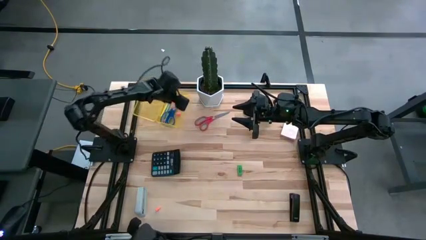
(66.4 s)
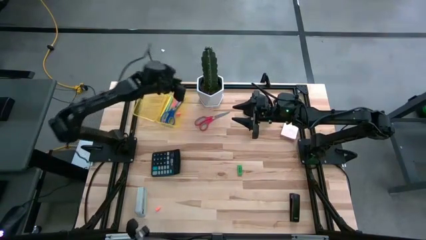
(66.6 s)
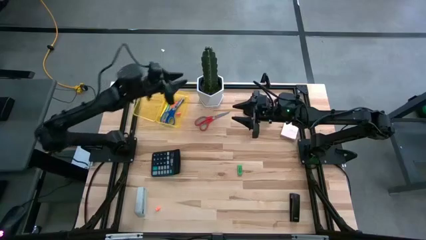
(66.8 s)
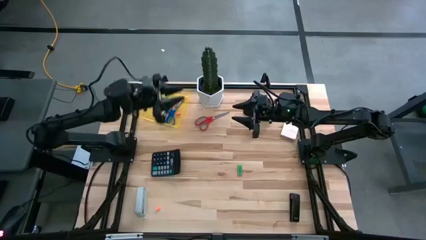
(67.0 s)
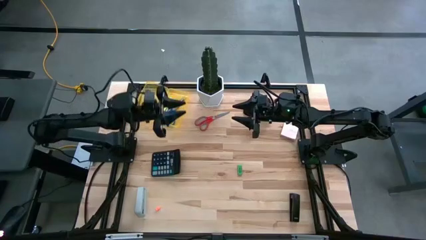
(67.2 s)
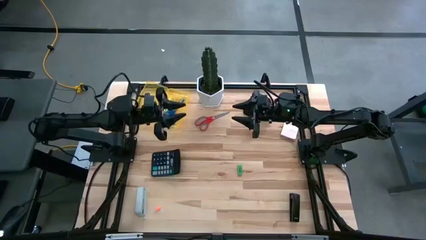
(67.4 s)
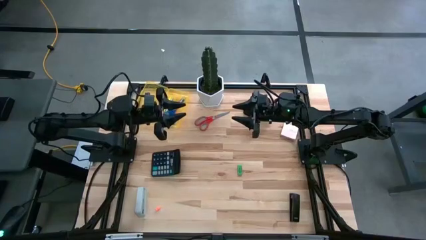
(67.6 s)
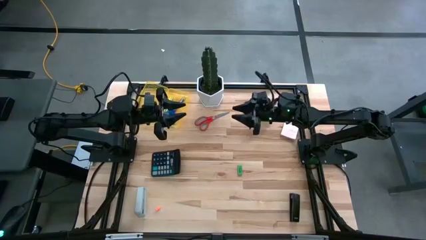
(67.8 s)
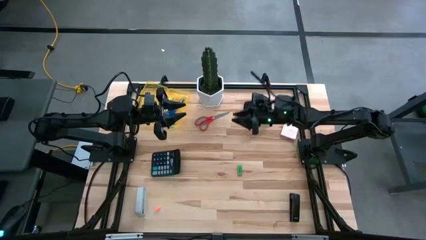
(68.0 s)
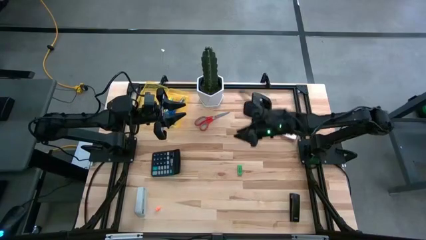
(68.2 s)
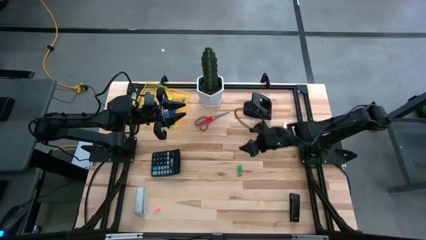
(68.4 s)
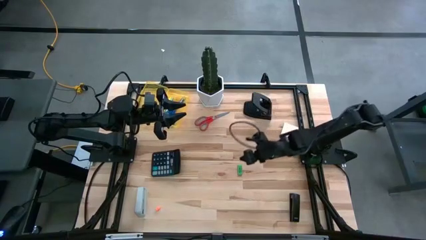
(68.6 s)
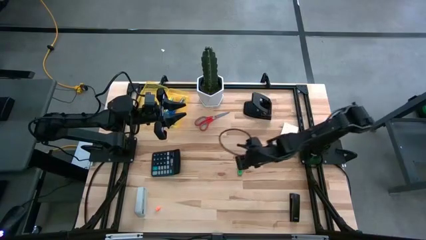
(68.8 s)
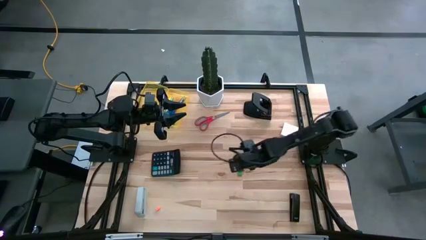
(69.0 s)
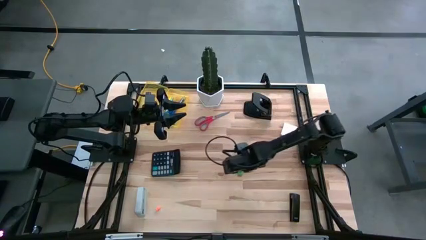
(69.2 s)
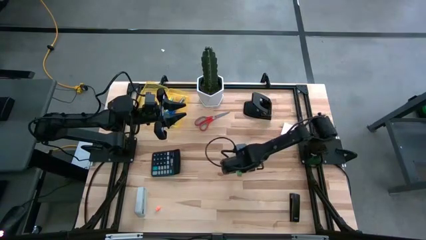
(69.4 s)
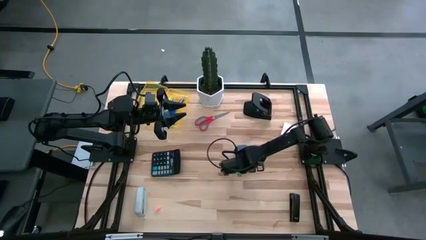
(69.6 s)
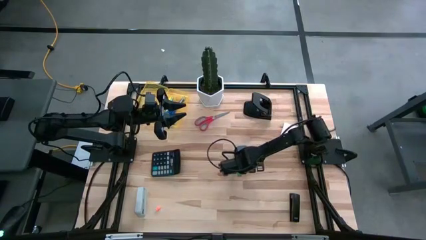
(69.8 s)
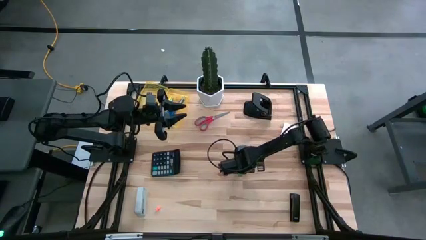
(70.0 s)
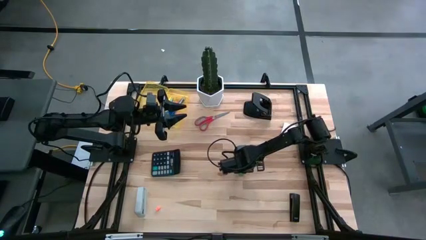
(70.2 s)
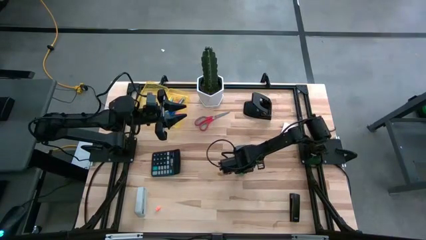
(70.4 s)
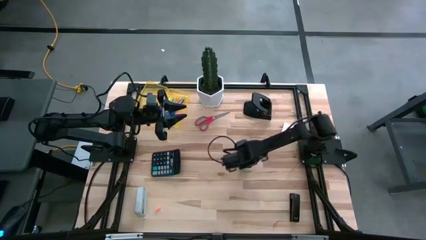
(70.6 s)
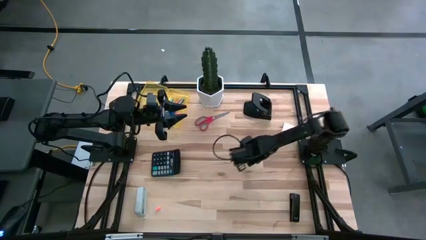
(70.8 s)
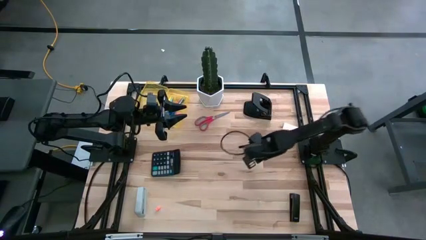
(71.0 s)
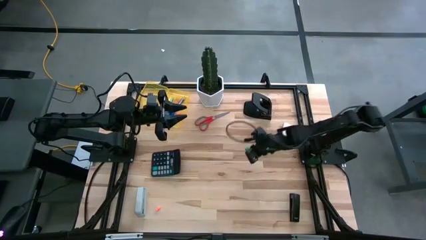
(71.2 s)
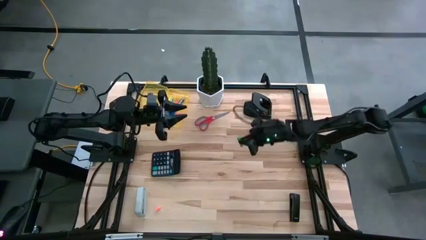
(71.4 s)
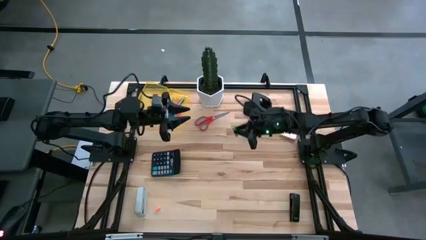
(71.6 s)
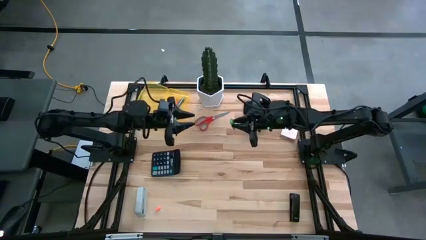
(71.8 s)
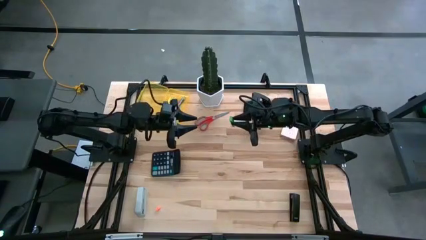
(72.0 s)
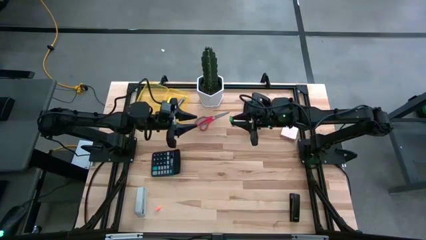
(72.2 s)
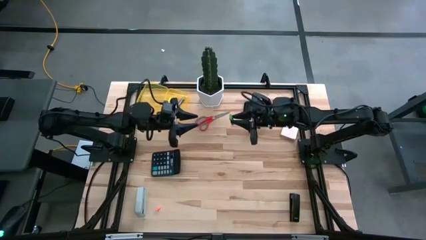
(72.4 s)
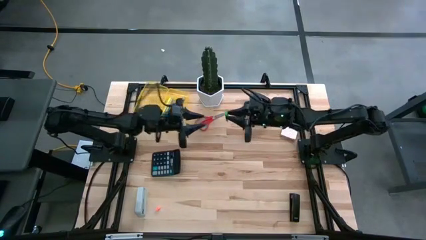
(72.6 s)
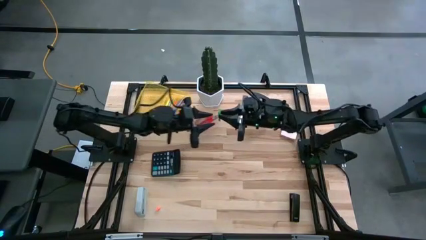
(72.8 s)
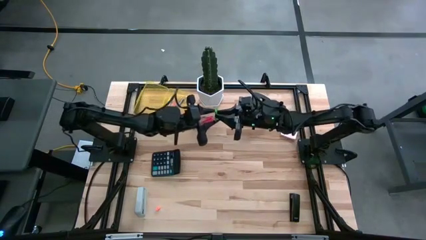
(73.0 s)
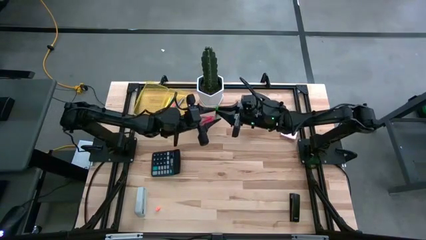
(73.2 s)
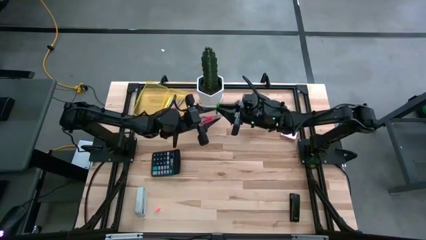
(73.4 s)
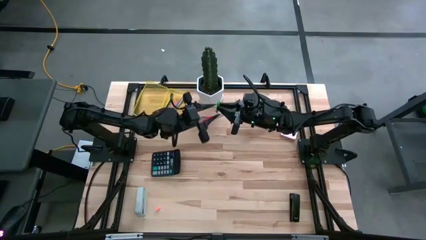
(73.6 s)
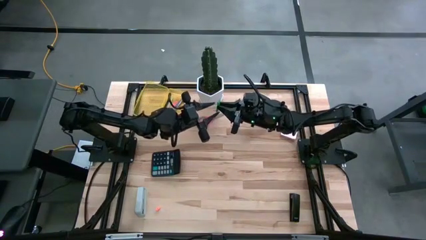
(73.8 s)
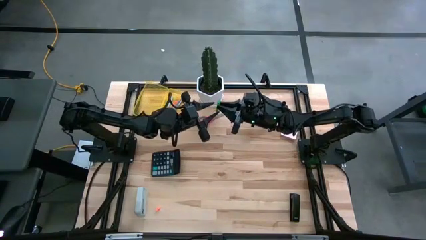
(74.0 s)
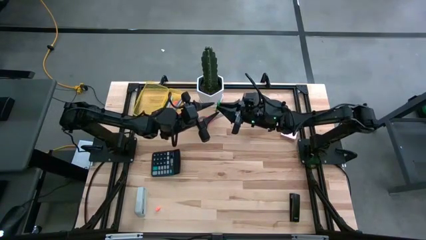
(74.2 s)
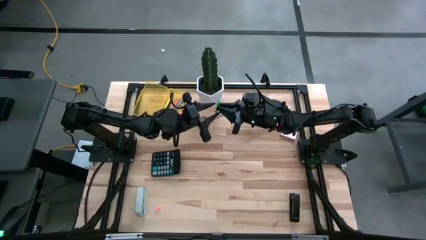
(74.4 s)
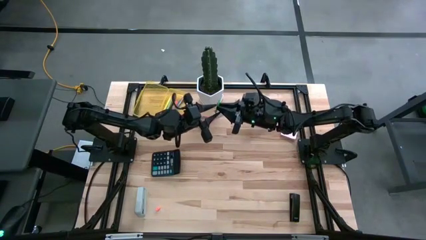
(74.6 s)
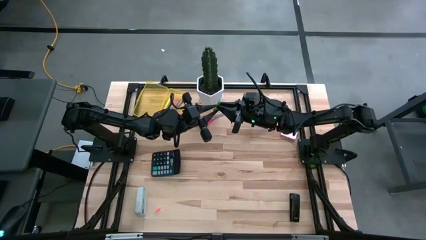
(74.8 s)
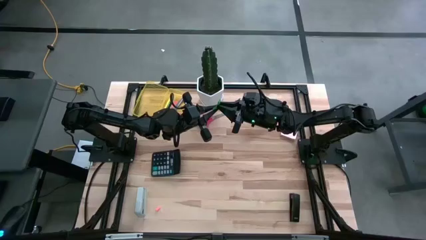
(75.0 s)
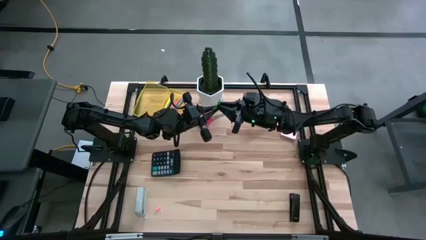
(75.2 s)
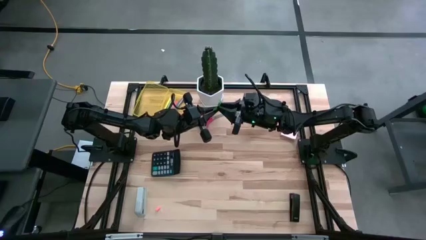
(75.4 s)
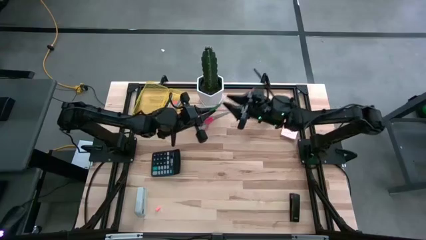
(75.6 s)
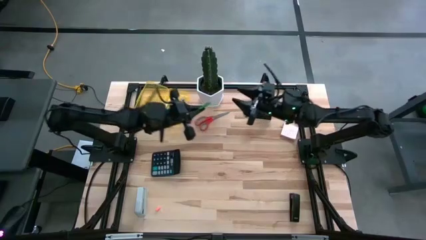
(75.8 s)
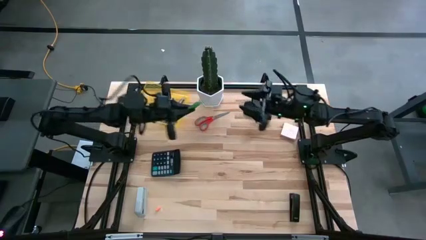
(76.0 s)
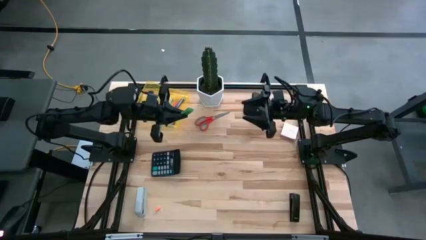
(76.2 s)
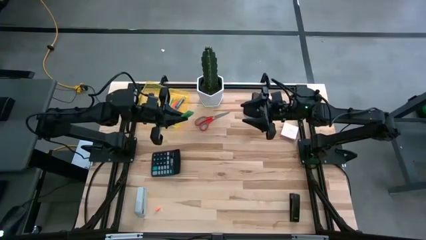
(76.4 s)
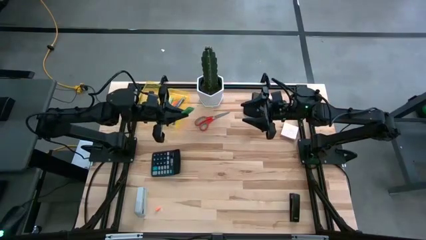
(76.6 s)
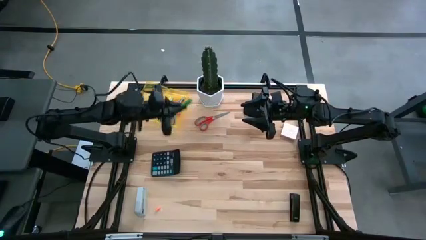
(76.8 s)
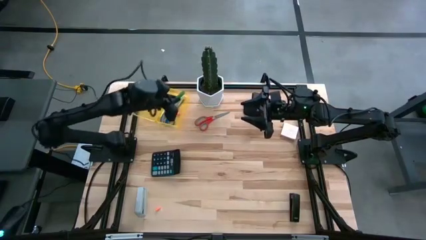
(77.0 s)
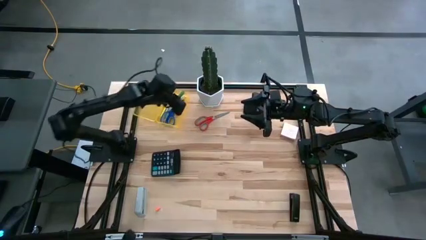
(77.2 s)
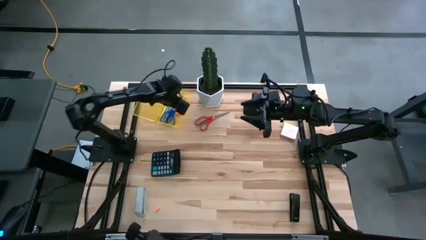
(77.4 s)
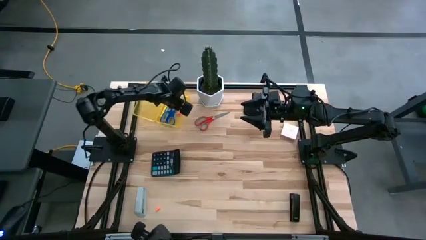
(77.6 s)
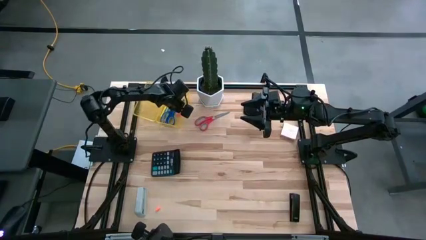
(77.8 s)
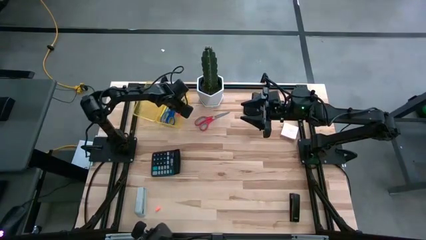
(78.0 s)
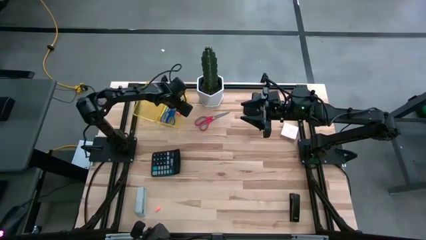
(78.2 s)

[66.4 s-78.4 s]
Task: Pack school essentials
Put the green eraser into the transparent yellow supply box
